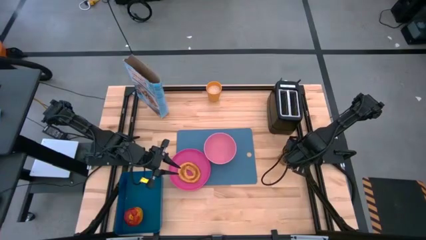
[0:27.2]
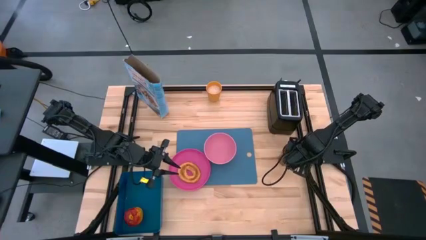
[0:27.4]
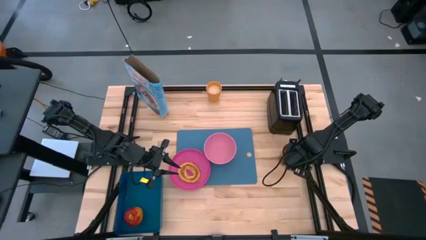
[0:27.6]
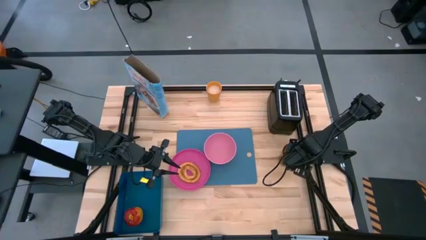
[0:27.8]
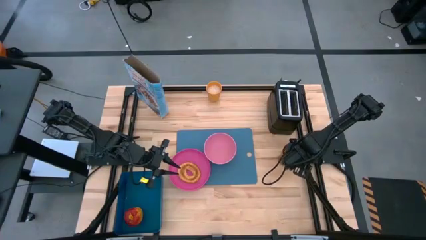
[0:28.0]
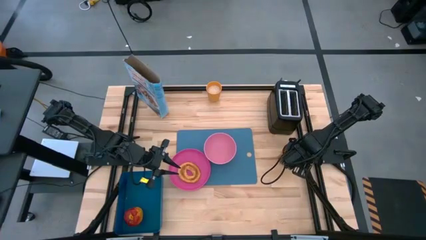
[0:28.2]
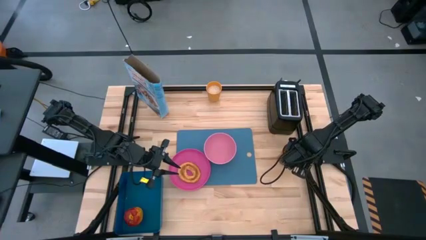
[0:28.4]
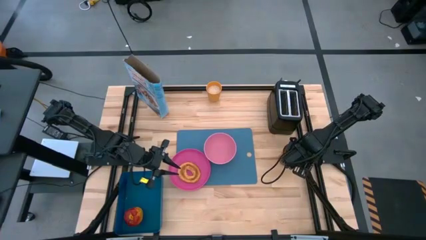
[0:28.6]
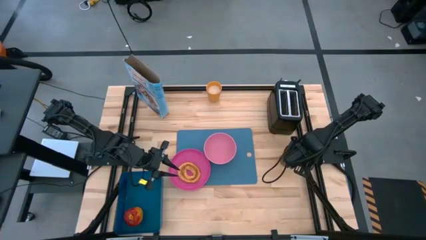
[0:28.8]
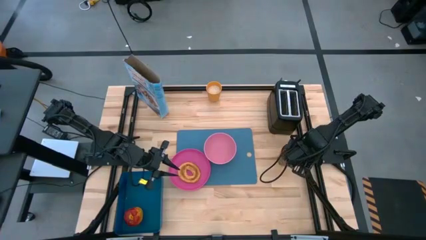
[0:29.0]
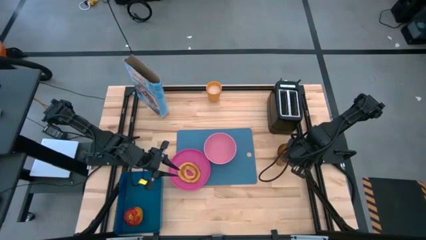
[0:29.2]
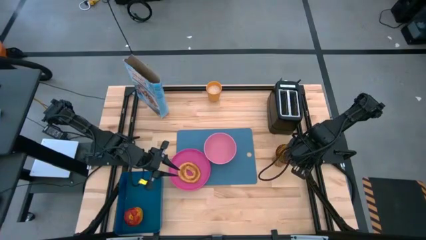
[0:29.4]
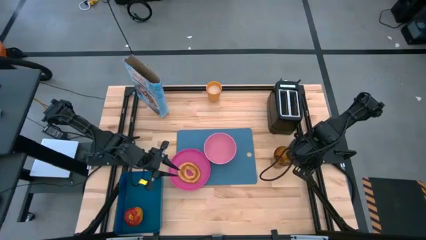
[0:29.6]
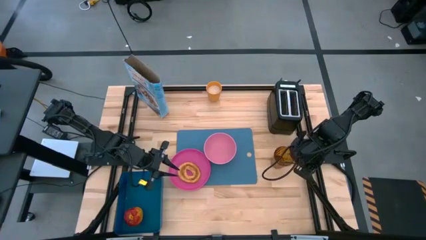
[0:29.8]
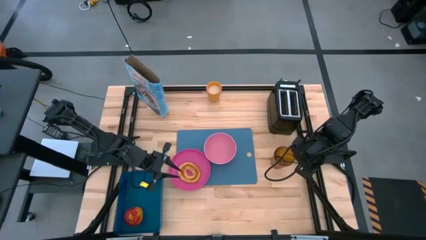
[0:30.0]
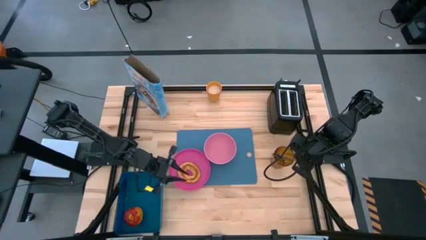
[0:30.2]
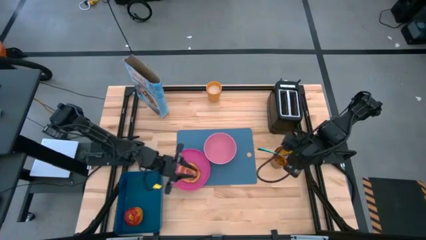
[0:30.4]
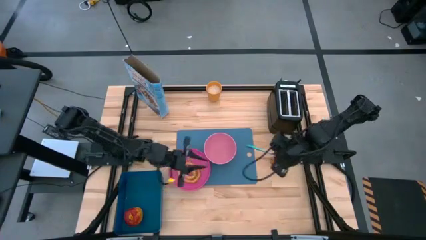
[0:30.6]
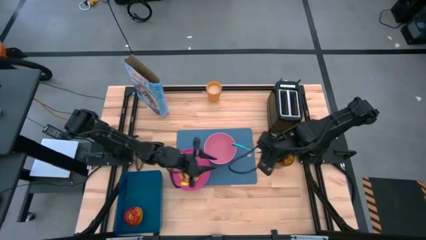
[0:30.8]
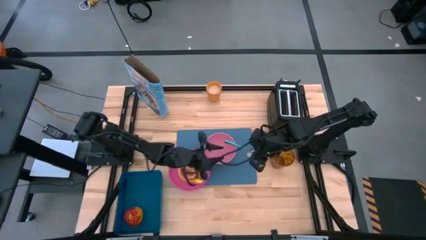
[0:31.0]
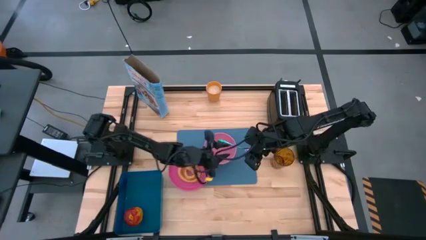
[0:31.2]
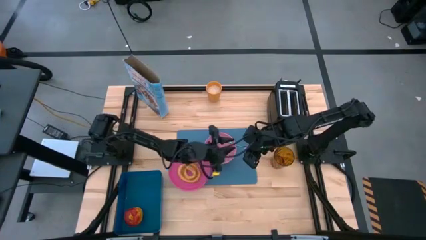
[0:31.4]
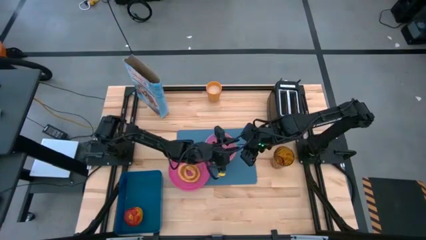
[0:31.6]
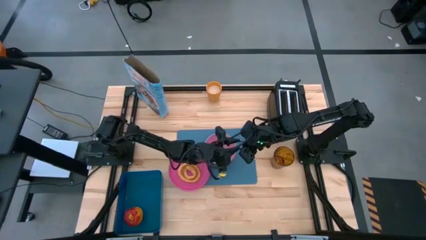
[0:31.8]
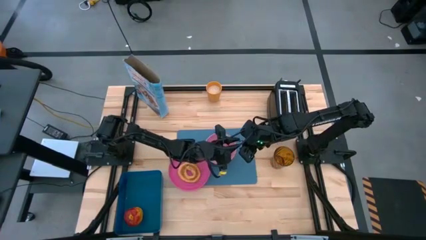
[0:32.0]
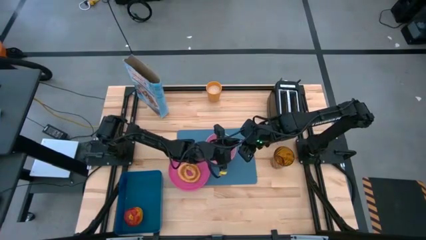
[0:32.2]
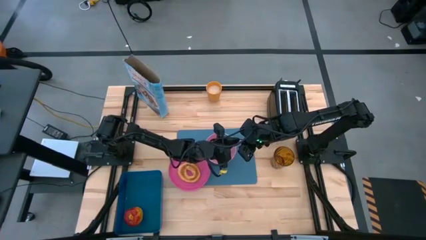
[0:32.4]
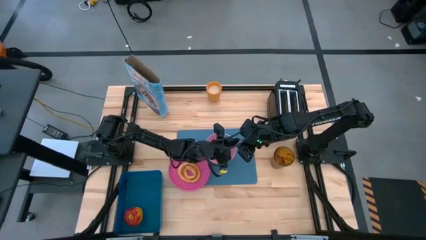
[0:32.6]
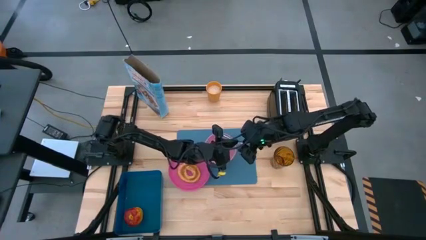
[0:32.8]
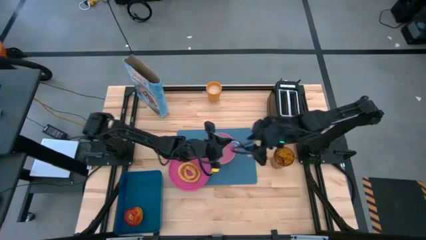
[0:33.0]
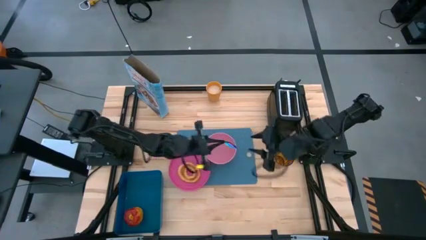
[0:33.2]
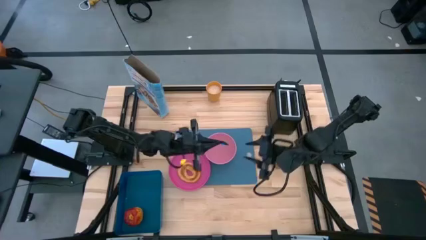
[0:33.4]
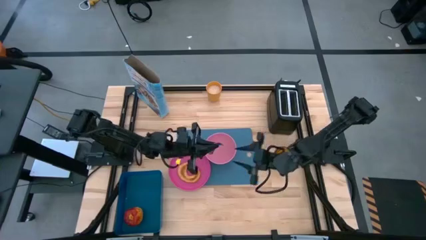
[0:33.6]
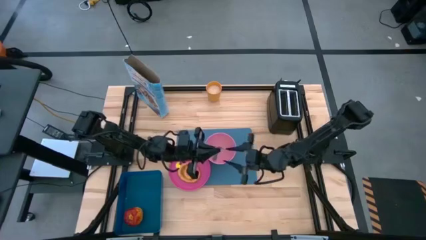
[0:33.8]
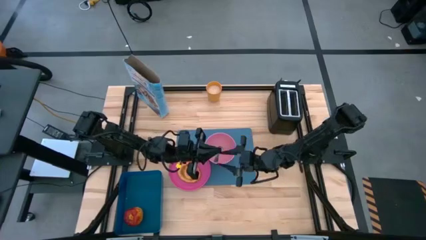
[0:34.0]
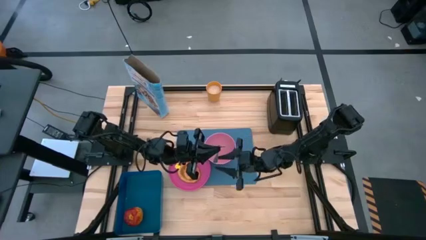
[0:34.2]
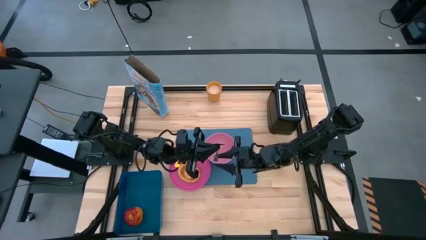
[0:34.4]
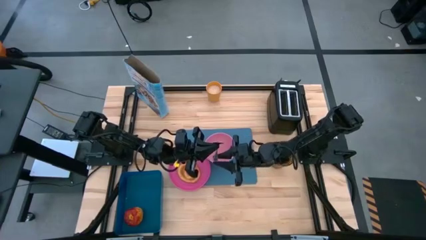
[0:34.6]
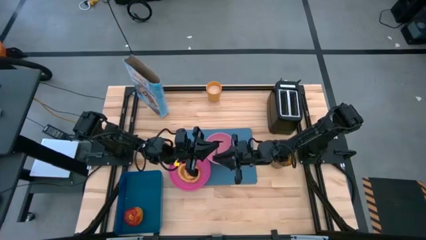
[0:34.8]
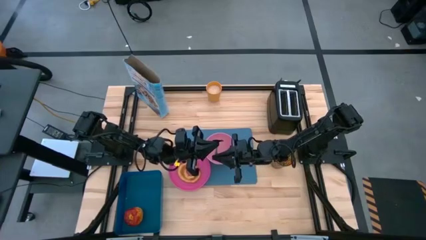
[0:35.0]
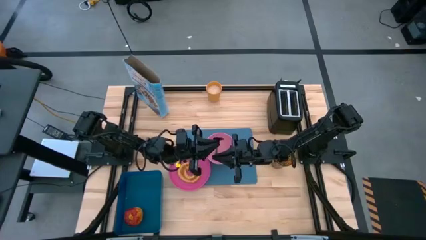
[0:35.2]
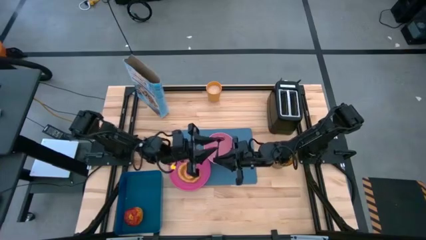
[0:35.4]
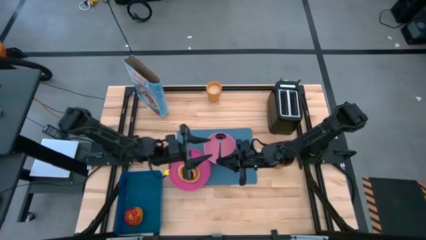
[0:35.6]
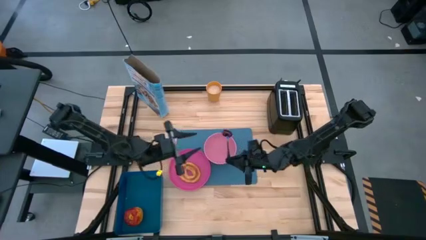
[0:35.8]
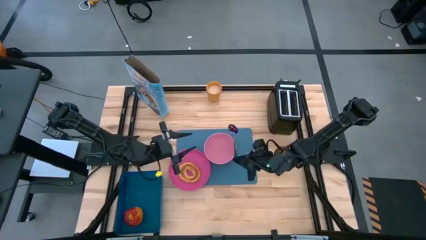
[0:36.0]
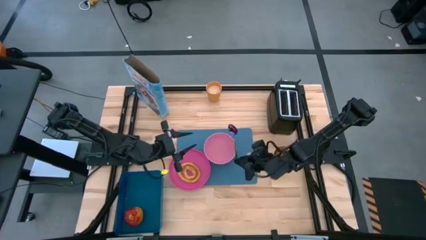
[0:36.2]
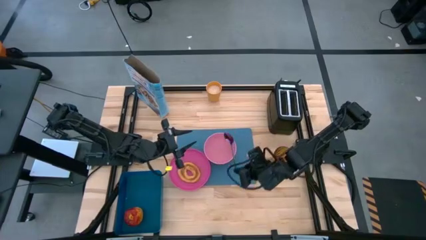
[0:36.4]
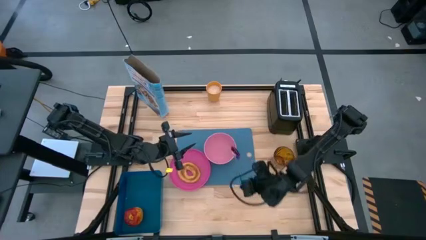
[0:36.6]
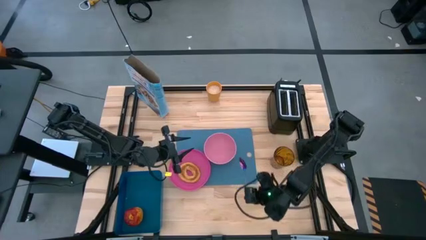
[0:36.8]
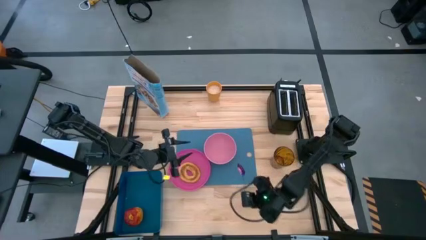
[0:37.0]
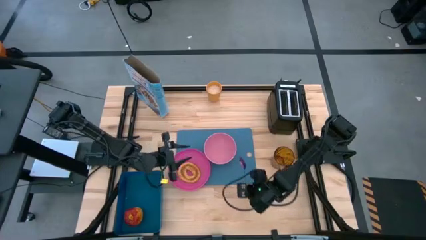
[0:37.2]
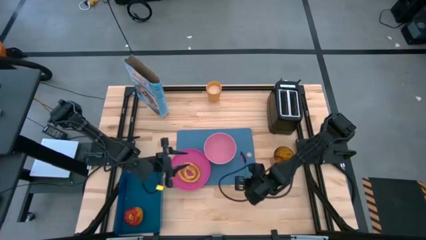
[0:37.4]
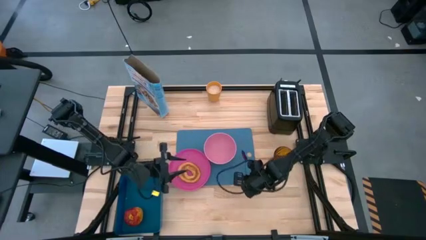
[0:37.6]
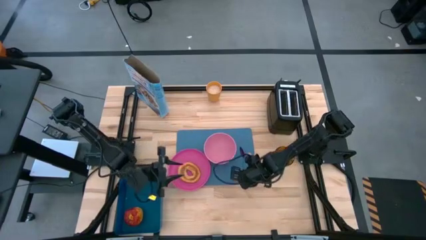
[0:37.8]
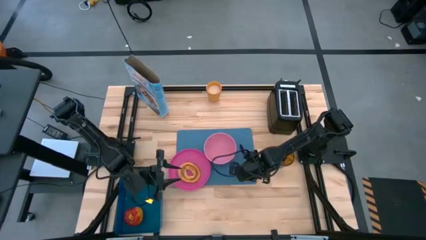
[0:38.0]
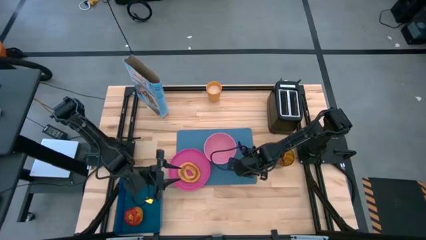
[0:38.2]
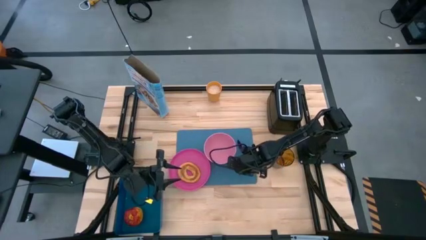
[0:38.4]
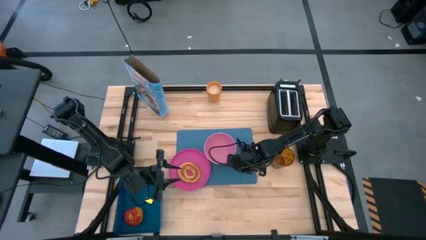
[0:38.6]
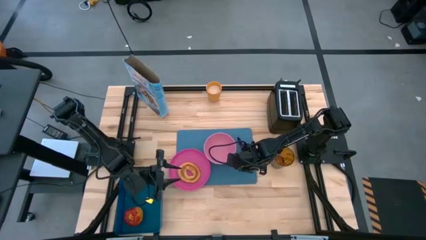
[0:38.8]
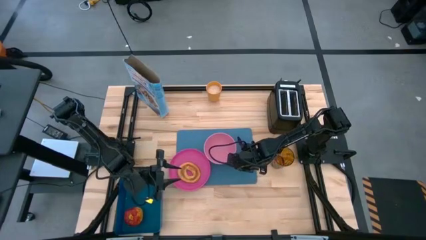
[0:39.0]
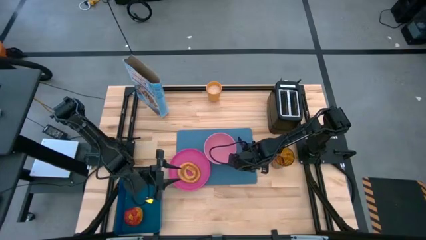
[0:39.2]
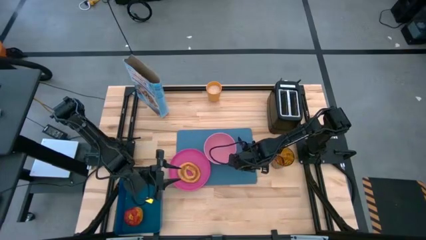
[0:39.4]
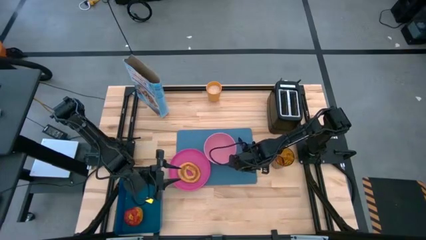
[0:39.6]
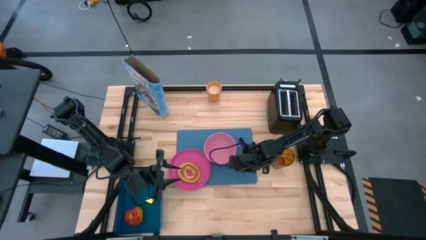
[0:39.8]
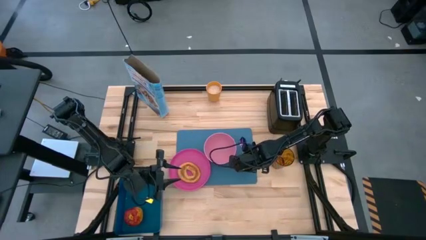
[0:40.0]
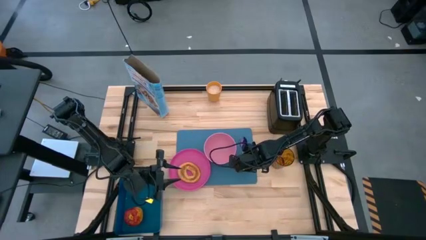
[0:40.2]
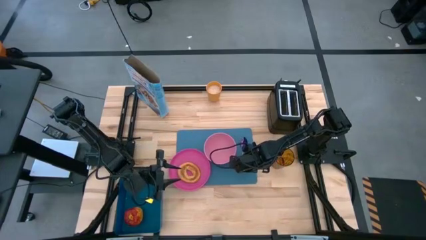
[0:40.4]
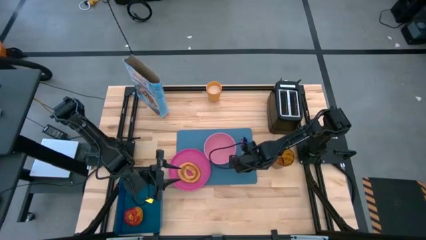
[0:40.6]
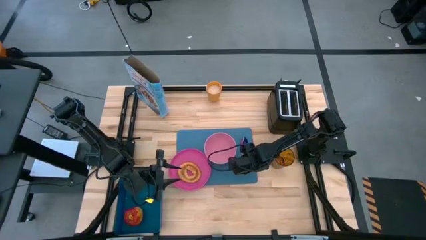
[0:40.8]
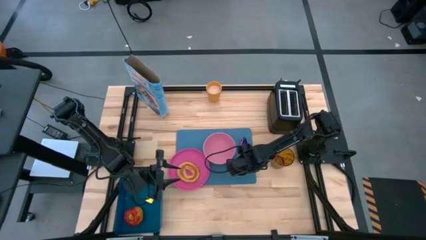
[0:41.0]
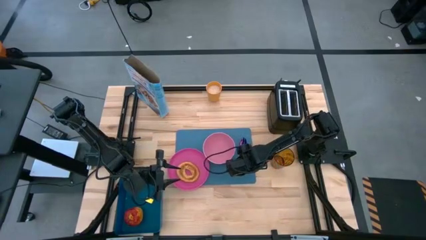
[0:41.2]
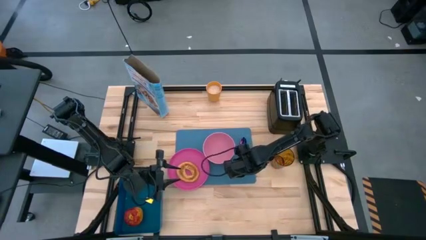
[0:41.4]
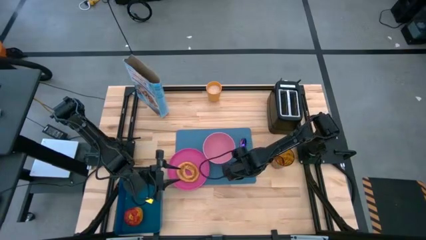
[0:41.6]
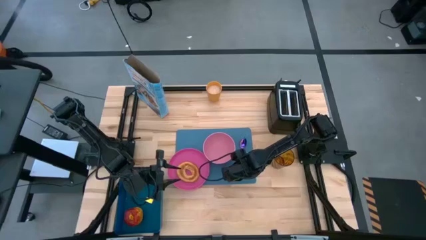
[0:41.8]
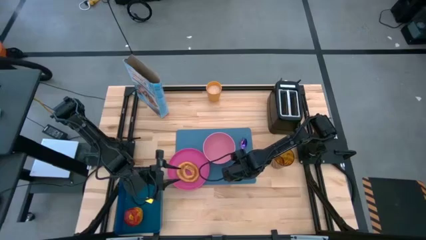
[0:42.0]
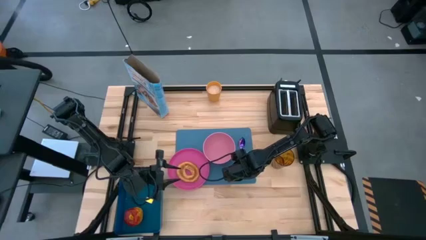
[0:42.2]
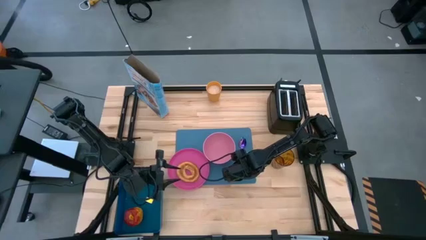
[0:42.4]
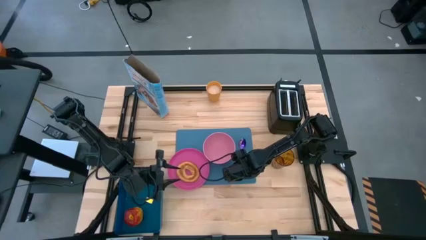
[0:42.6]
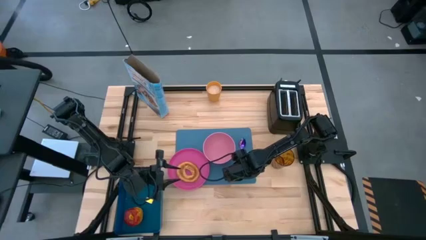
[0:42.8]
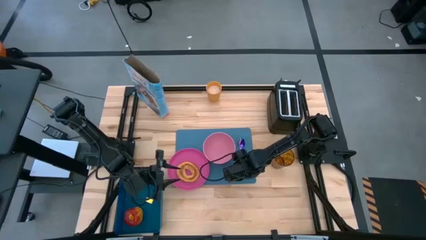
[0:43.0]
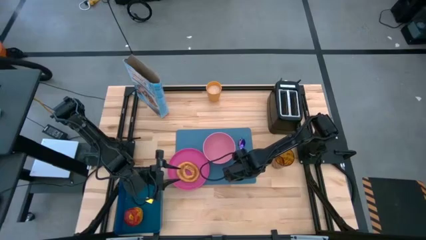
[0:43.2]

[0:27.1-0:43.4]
Task: Arrange a breakfast setting
Put the blue spoon on the blue tablemat to the right of the pink bowl
